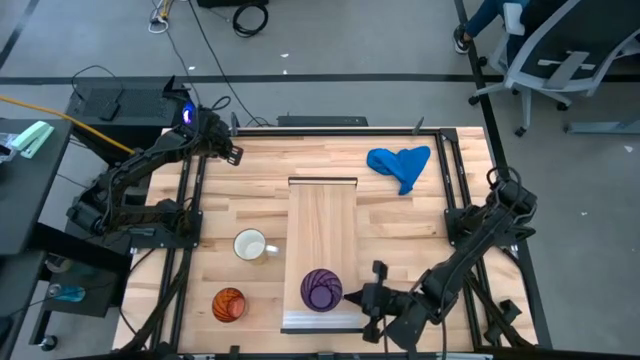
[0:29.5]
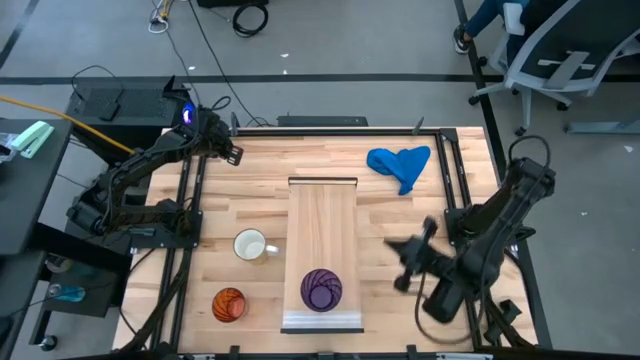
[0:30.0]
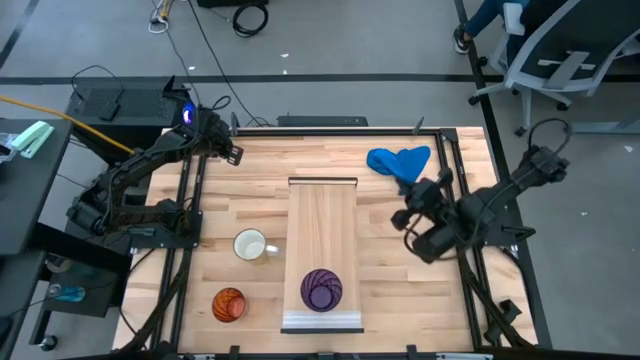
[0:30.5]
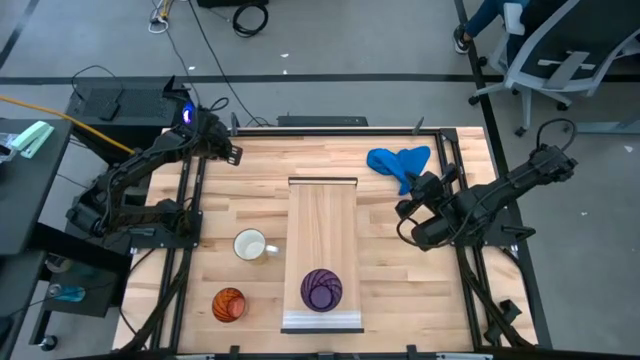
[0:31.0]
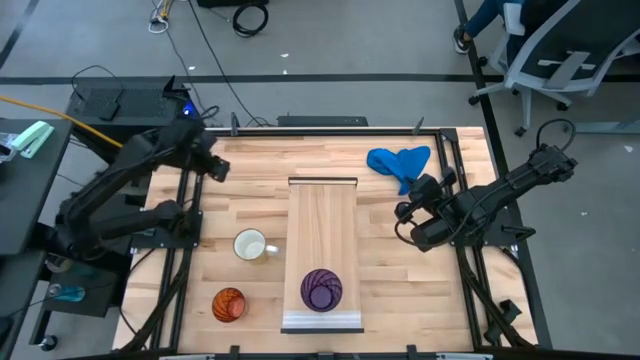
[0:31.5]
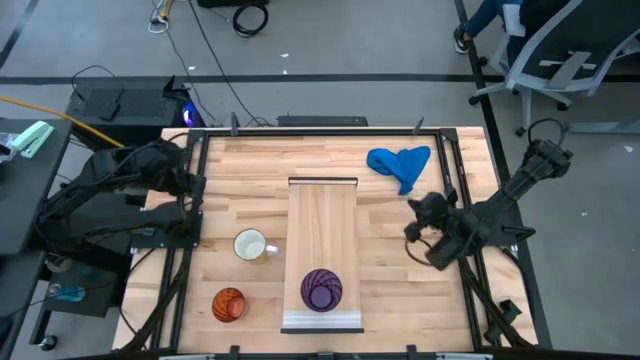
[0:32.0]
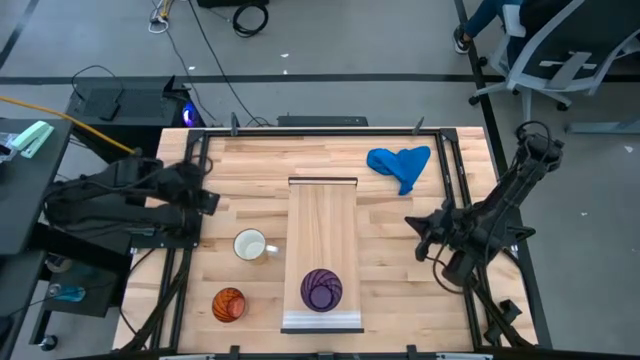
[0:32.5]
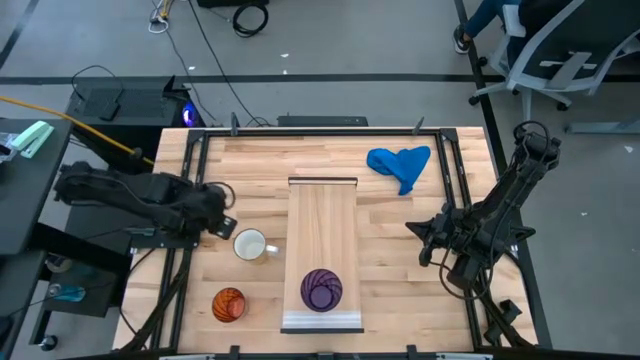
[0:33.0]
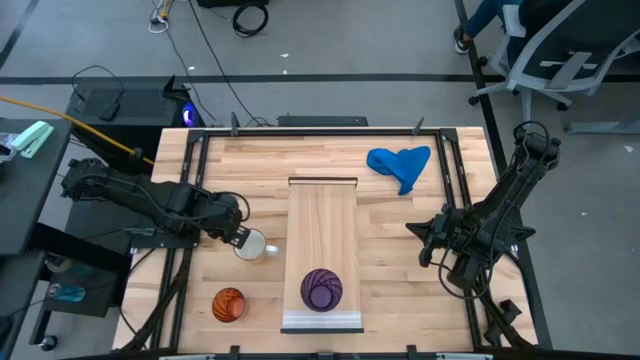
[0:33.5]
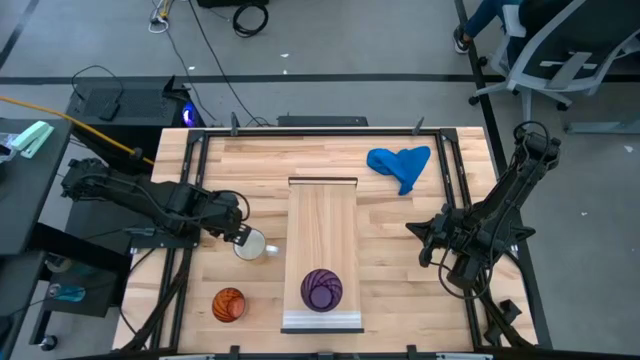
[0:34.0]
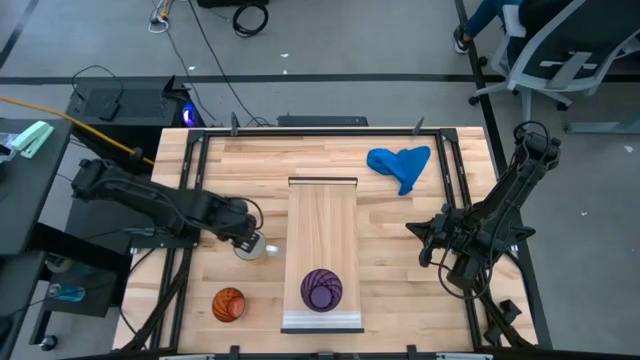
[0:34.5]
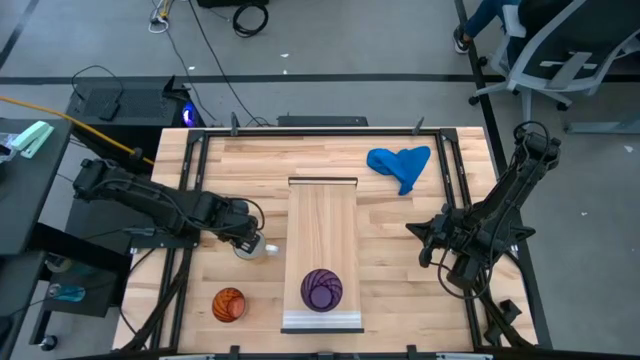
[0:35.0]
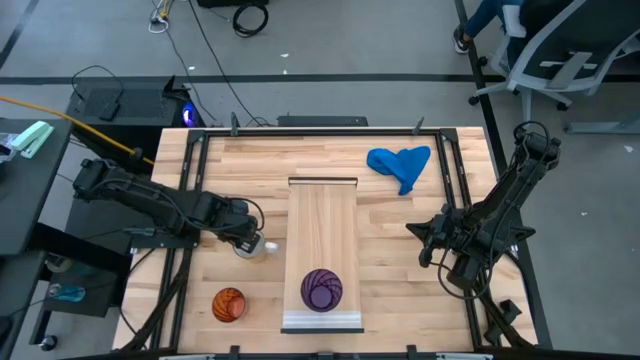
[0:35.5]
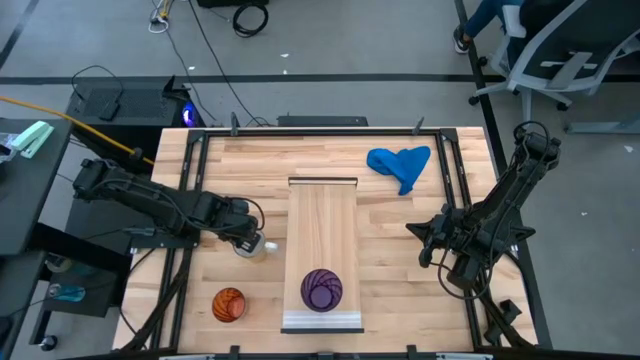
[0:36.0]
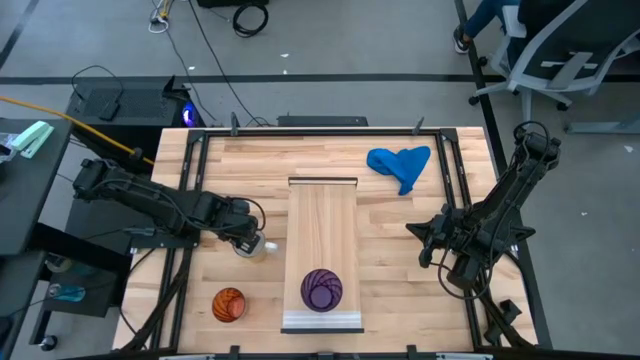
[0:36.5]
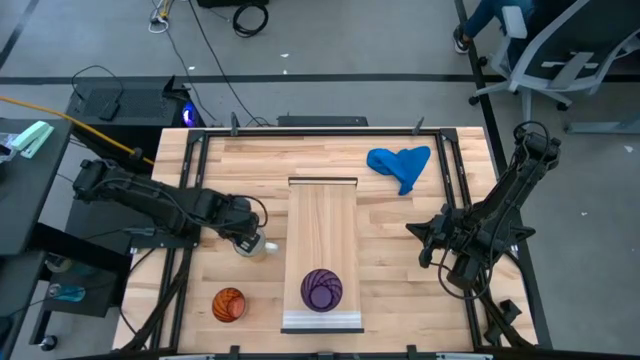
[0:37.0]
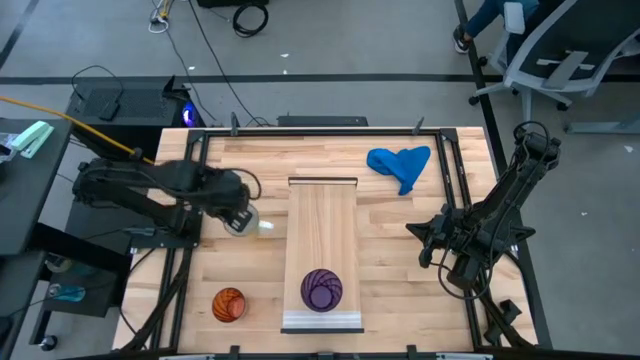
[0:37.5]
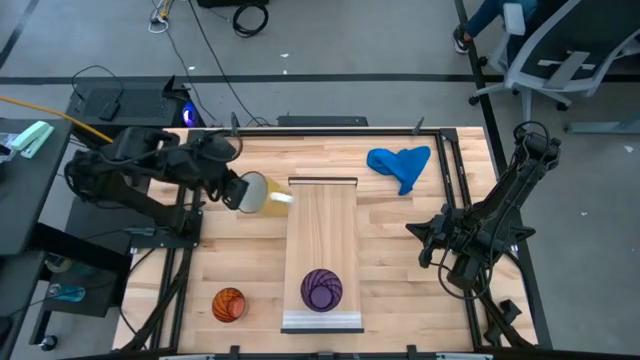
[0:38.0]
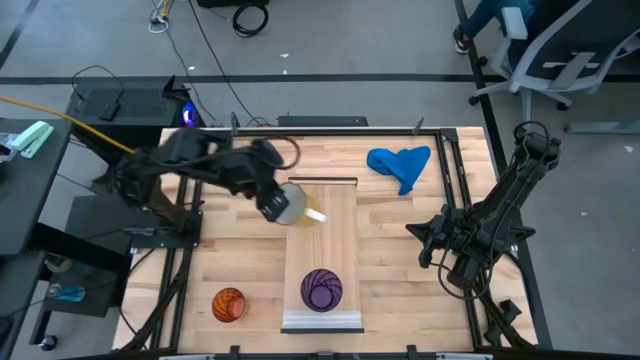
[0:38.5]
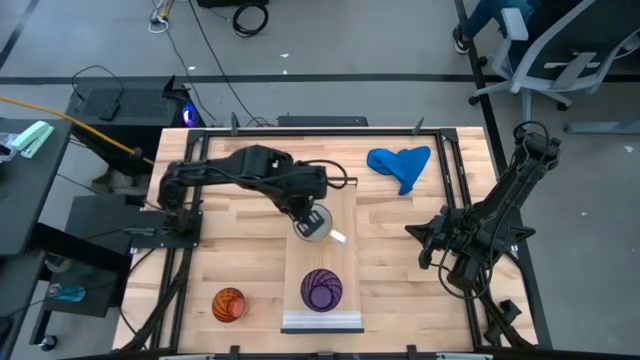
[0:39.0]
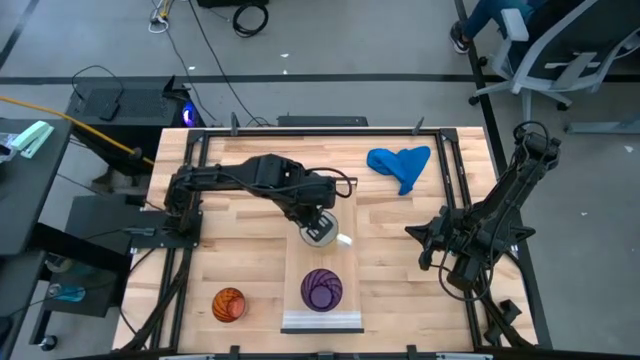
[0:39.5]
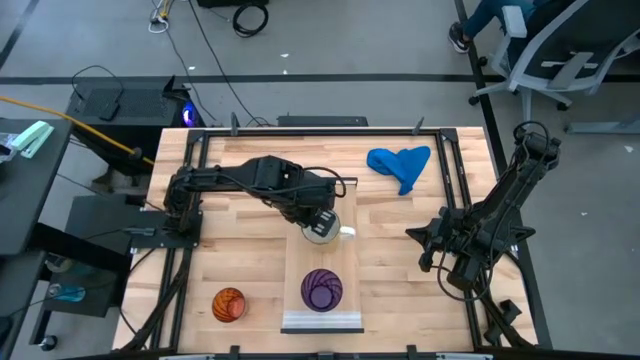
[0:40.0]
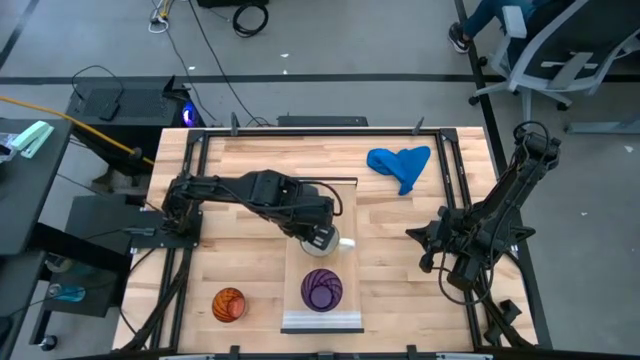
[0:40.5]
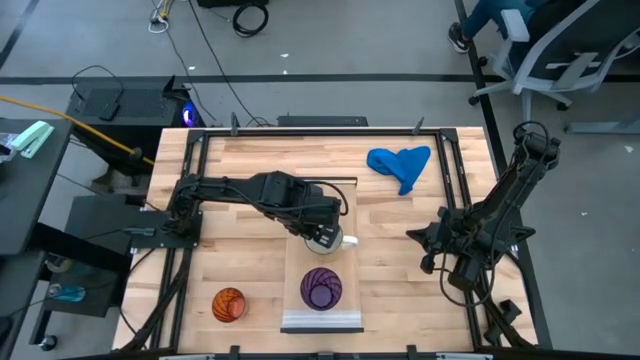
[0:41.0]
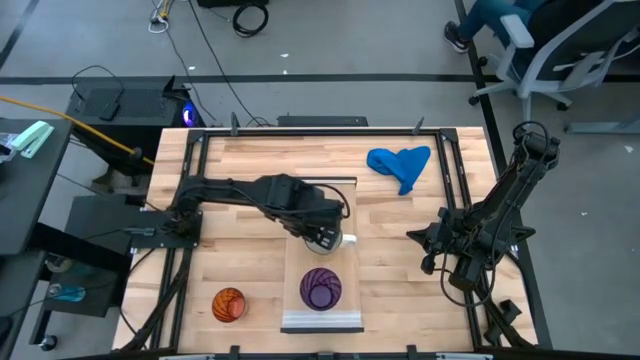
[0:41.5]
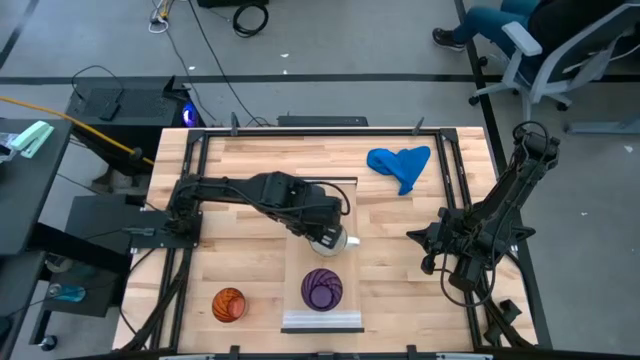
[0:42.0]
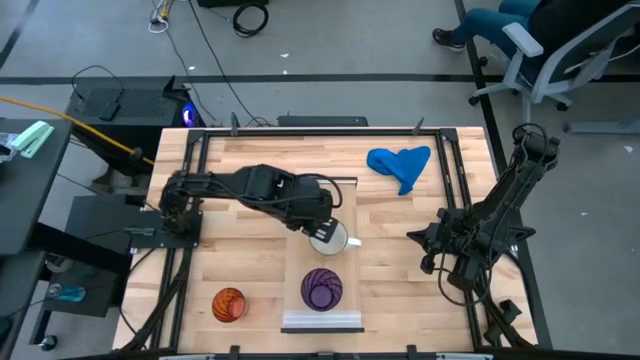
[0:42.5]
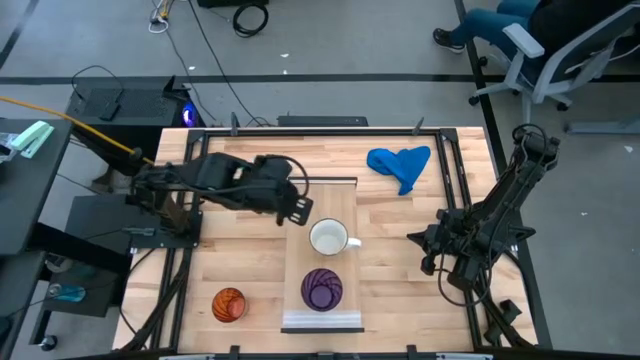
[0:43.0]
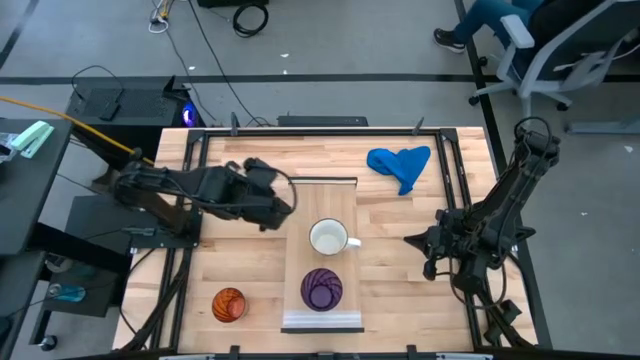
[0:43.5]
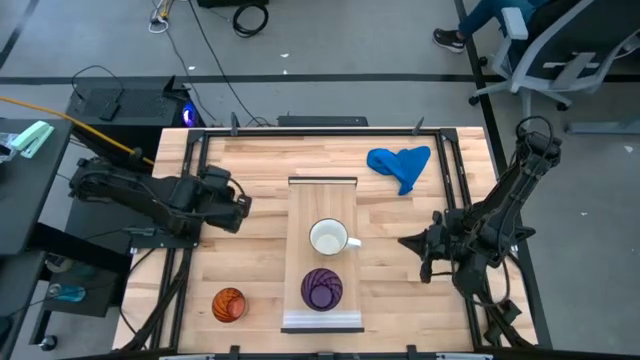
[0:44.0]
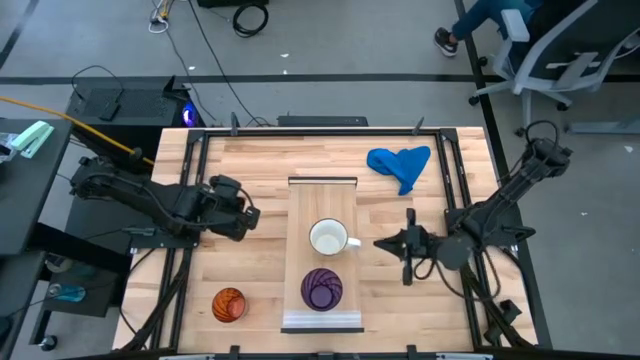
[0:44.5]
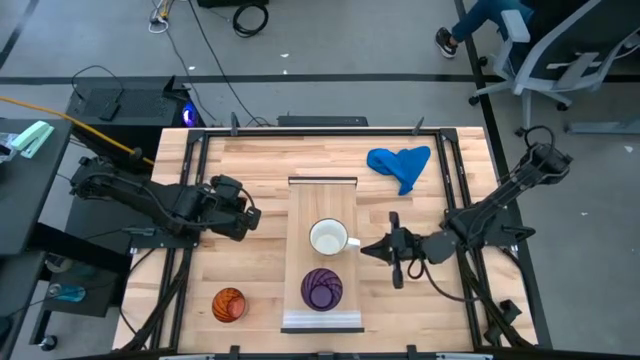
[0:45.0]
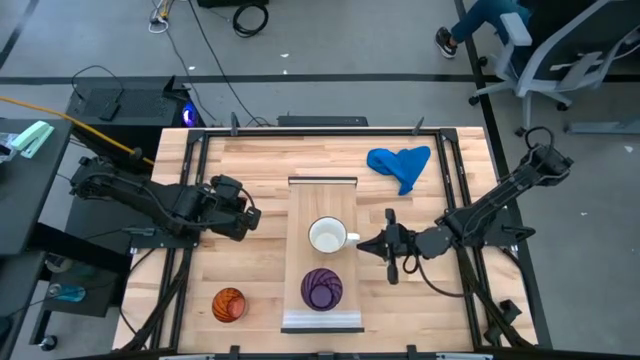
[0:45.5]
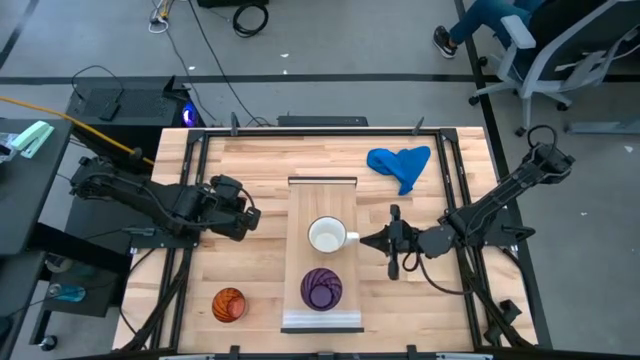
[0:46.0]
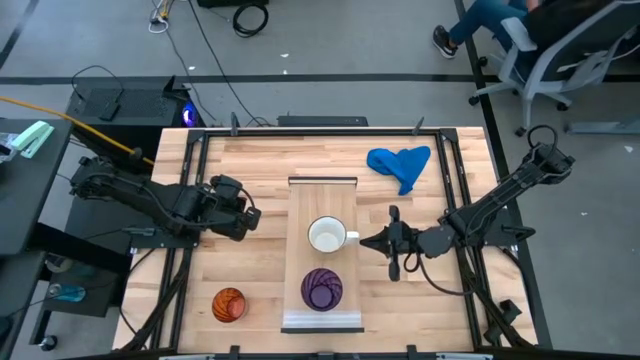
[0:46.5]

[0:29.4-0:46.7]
Task: Stack small to large cups/mugs on shelf
Put the yellow cup on the shelf

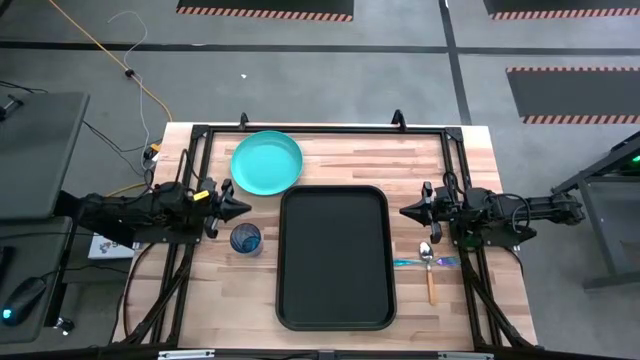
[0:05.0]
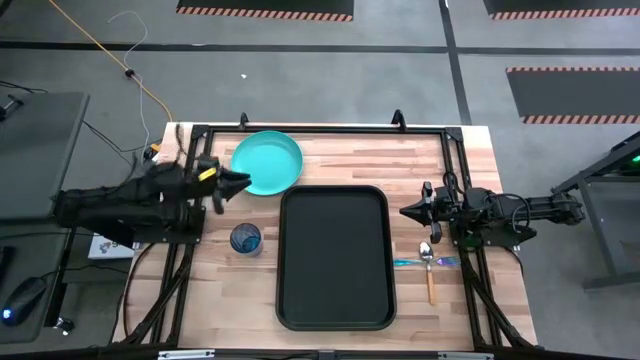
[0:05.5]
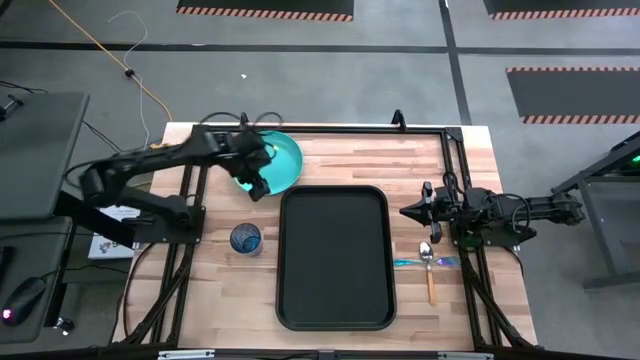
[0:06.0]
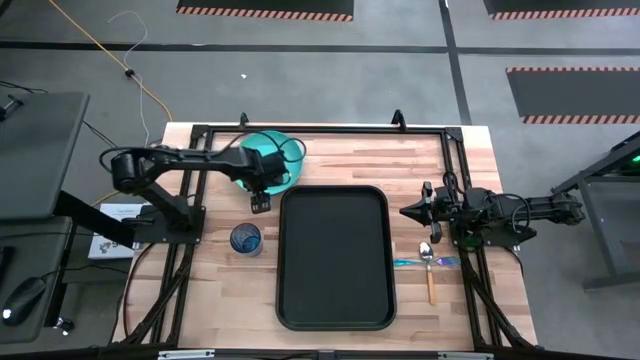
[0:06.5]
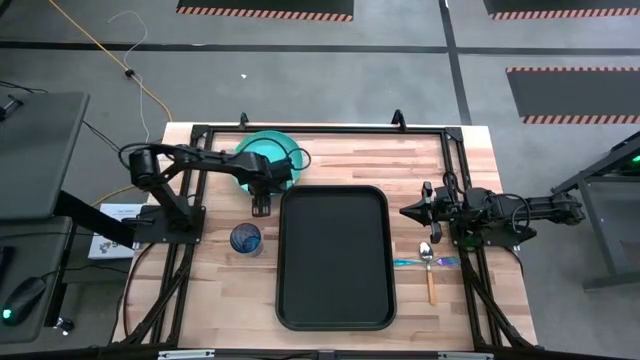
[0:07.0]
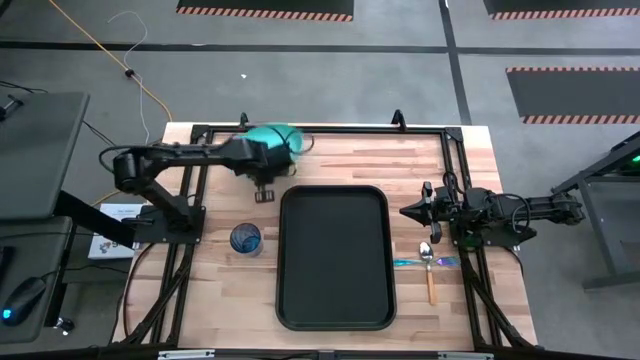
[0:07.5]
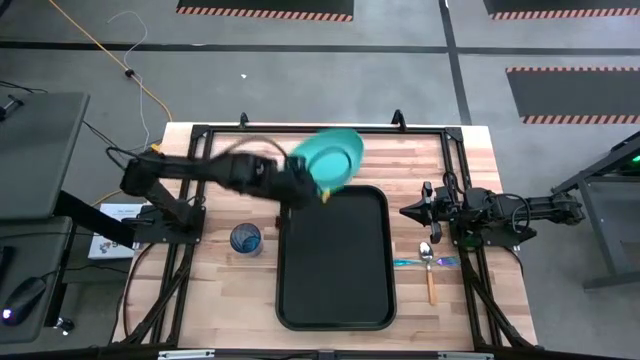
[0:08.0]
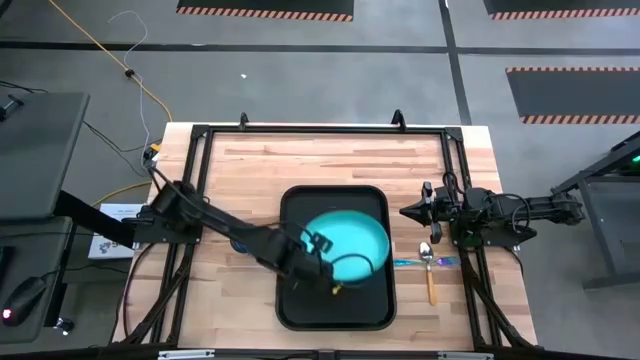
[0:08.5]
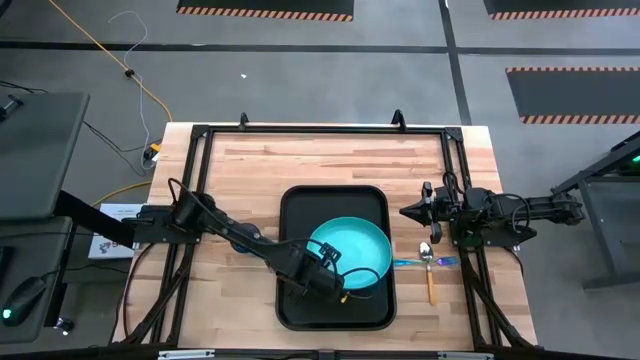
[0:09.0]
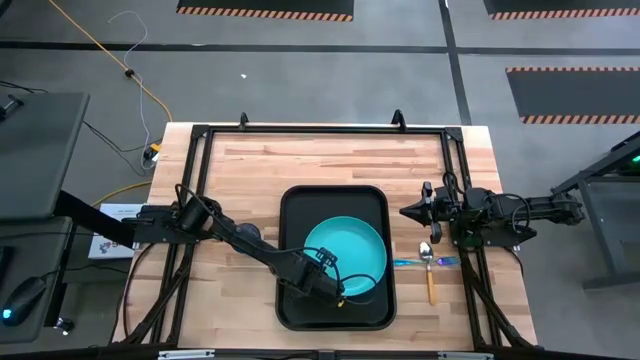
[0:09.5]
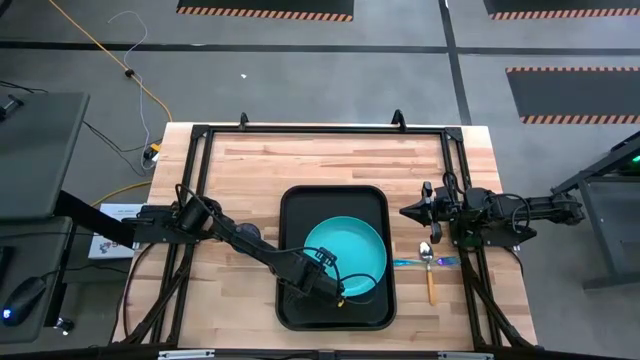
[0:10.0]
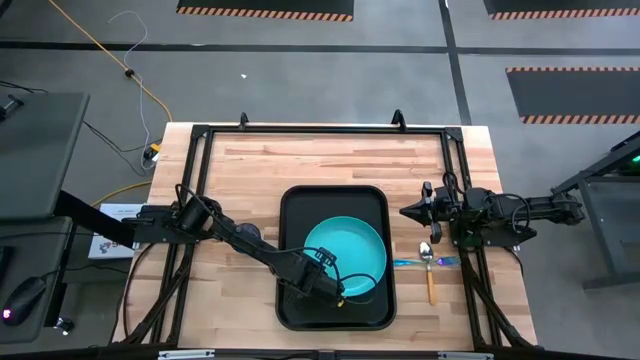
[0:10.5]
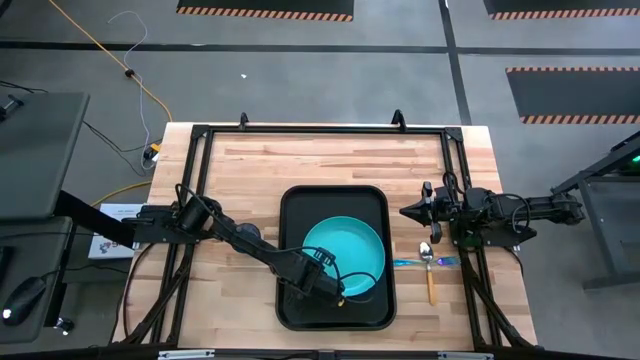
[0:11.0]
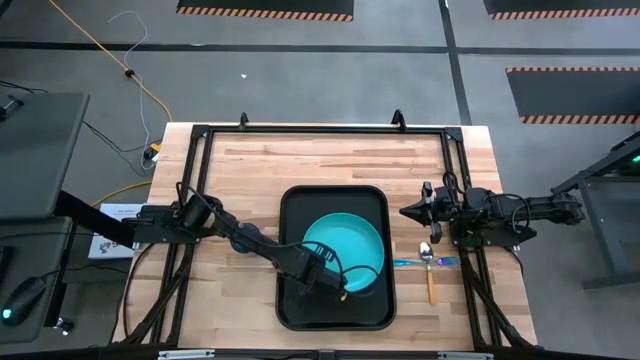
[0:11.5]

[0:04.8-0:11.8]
Task: Pick and place plate/cup/fork/spoon on tray
Put the blue plate into the black tray
